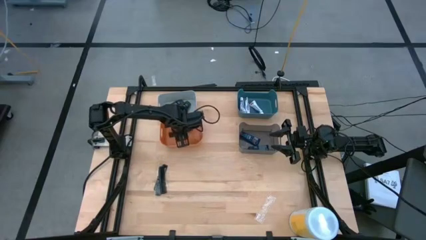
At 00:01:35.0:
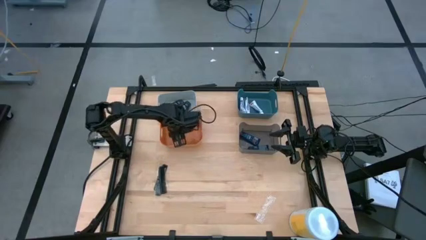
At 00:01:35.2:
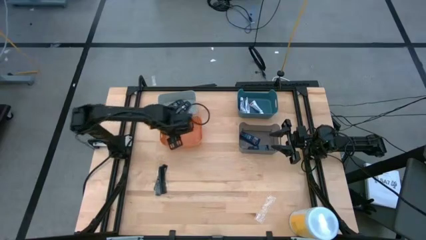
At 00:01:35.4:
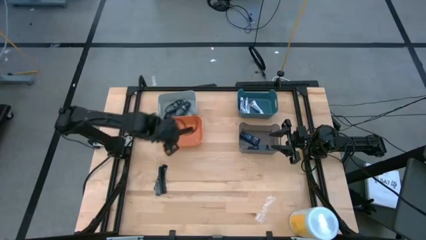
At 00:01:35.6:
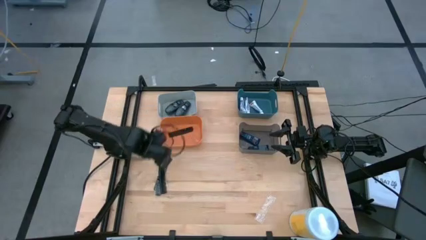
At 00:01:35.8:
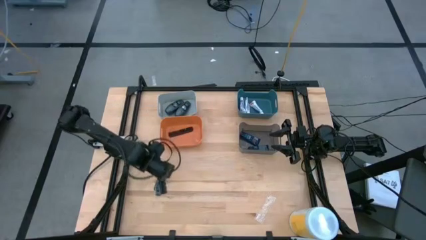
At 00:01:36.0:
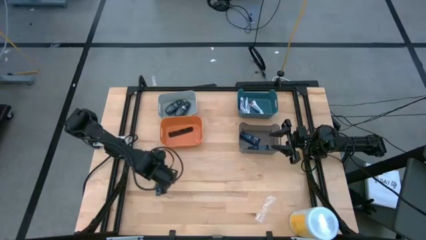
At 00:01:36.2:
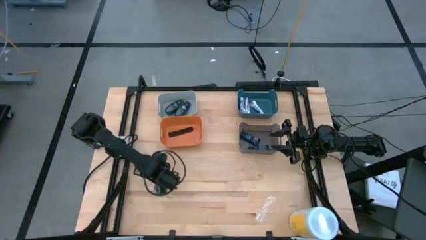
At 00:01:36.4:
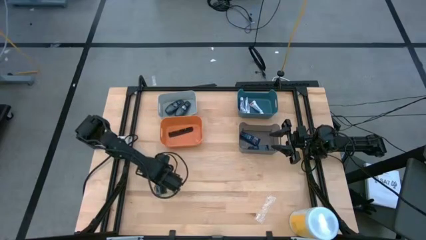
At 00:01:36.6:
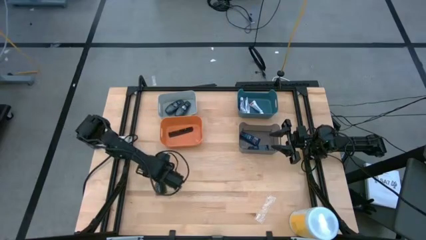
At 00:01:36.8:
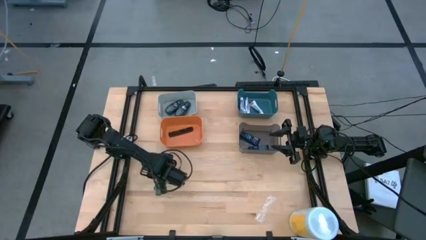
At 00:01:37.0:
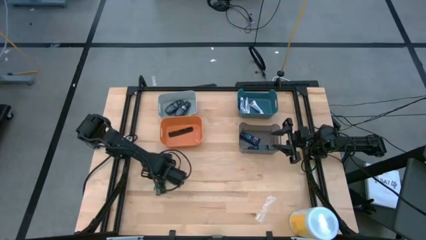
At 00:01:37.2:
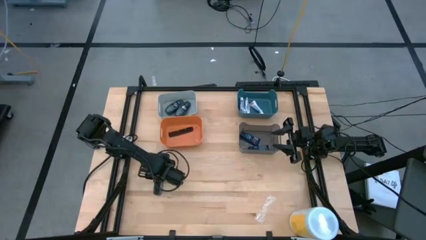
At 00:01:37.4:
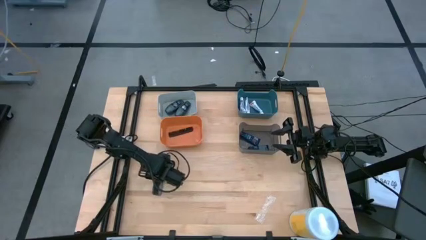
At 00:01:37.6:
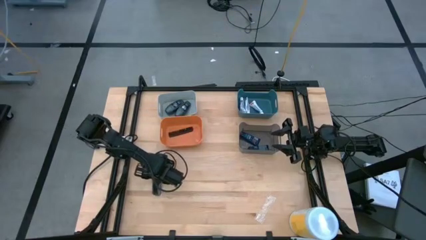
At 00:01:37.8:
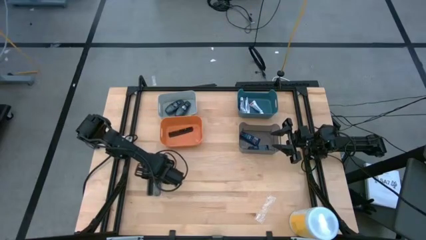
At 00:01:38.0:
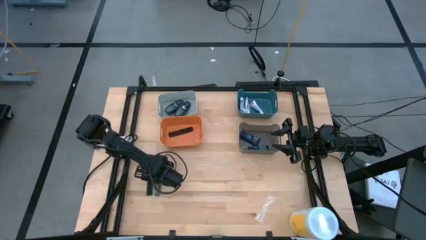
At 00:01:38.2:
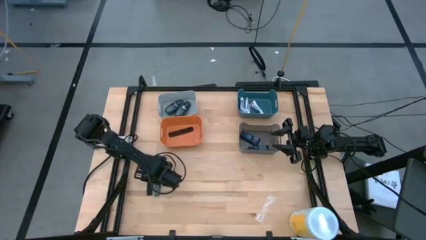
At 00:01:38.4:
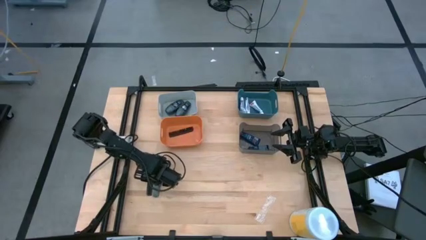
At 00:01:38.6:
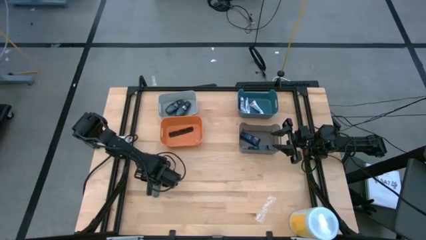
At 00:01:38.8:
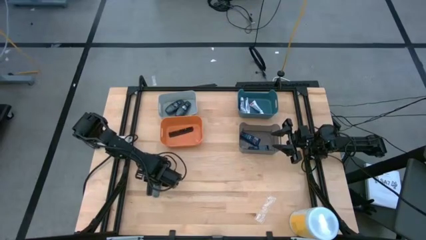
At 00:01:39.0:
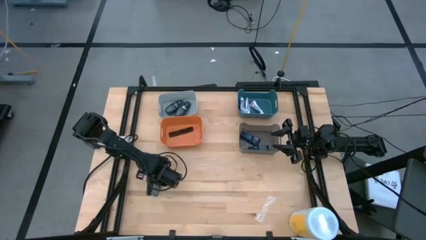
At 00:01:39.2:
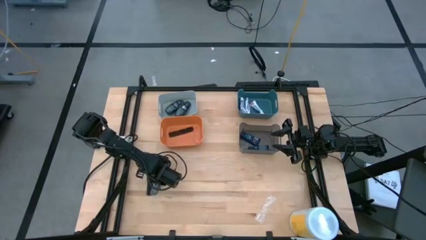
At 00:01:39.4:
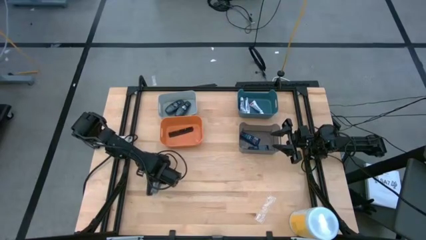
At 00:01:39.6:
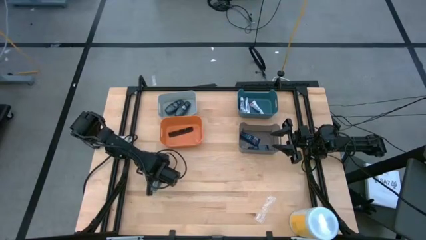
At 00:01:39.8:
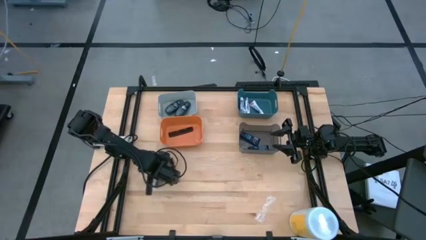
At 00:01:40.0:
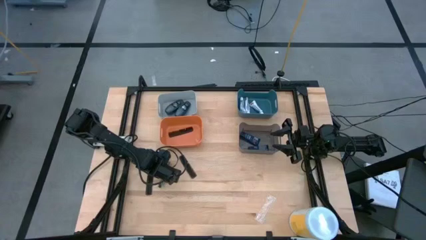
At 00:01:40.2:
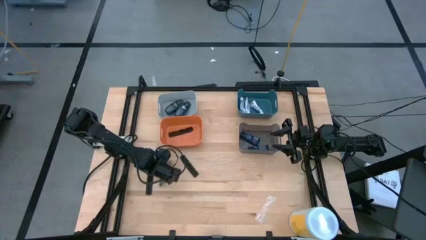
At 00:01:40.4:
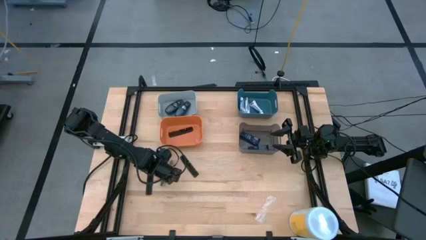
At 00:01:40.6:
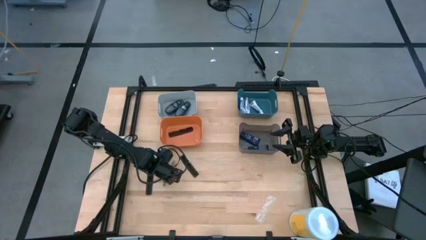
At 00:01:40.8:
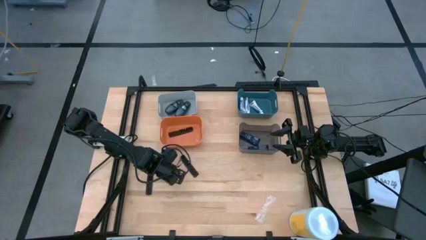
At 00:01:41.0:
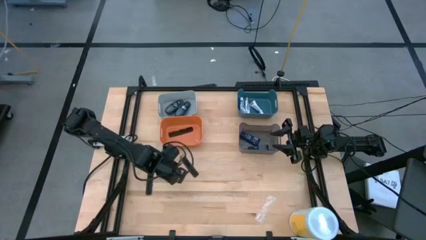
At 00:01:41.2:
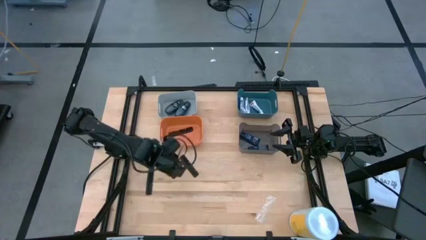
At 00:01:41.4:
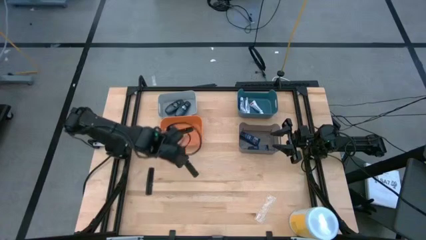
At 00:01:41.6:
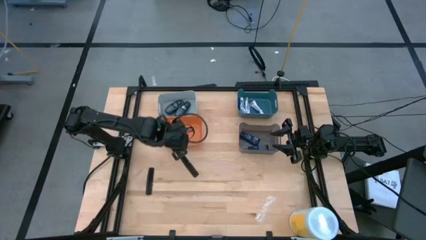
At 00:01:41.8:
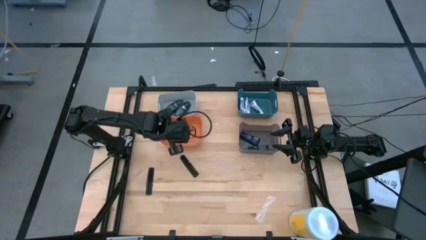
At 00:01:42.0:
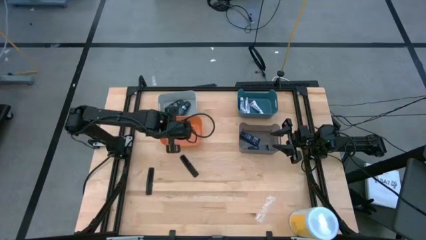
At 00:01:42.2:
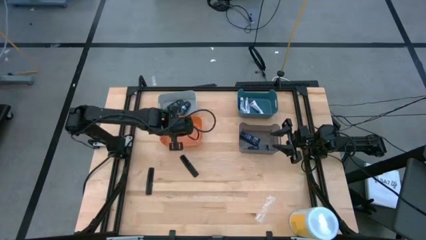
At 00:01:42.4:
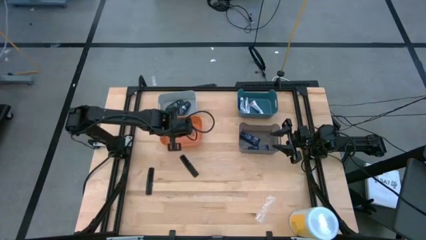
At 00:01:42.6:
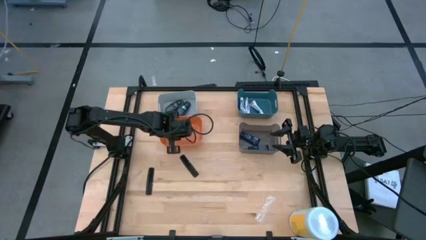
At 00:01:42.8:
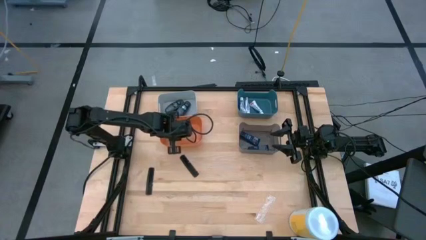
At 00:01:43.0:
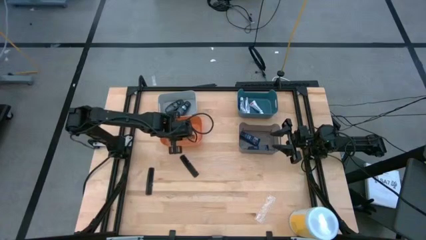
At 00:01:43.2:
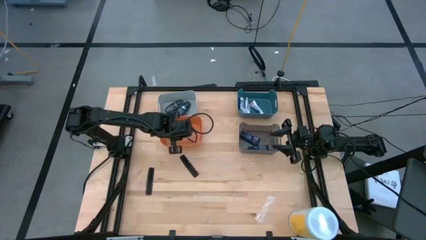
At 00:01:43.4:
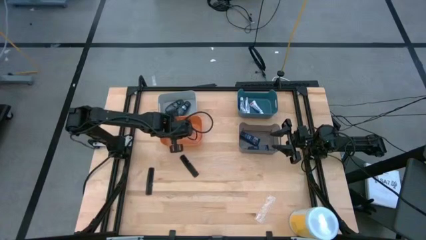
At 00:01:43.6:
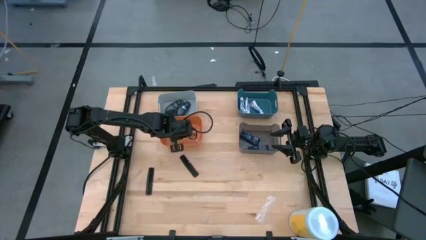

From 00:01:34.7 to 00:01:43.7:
Task: Pick & Place Travel size toiletries
Put the black comb into the orange bin

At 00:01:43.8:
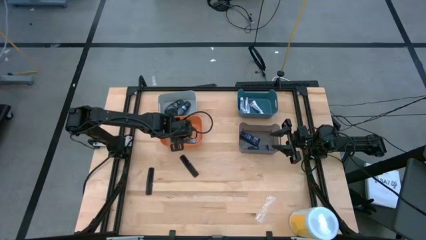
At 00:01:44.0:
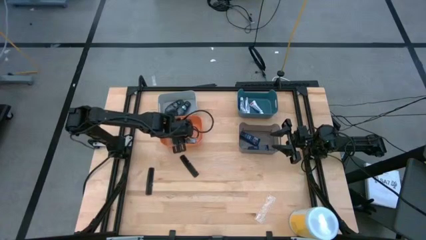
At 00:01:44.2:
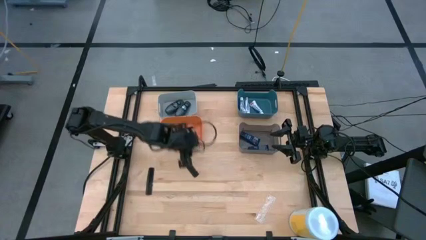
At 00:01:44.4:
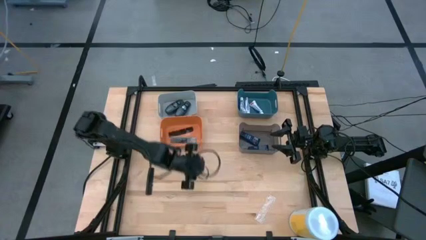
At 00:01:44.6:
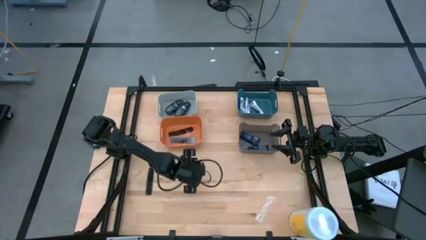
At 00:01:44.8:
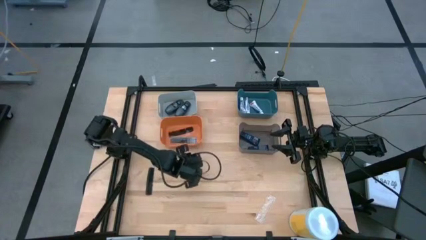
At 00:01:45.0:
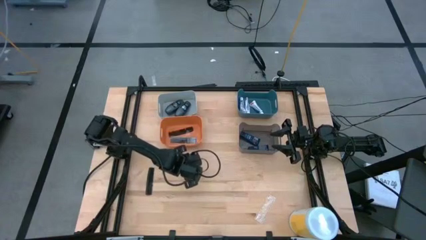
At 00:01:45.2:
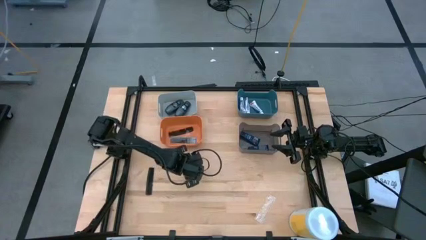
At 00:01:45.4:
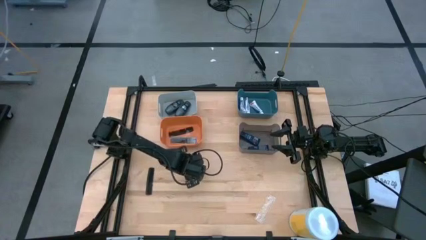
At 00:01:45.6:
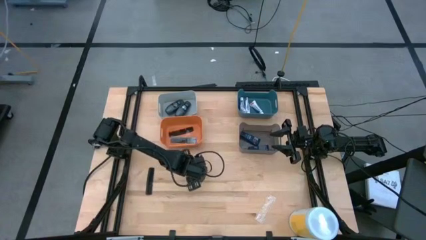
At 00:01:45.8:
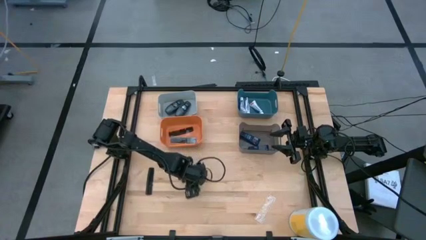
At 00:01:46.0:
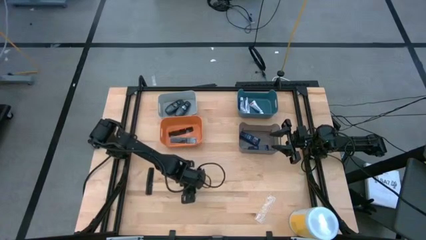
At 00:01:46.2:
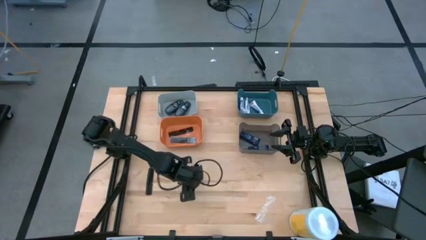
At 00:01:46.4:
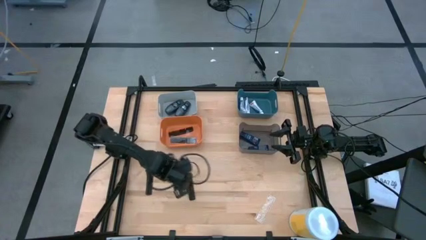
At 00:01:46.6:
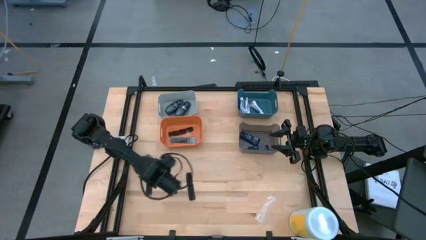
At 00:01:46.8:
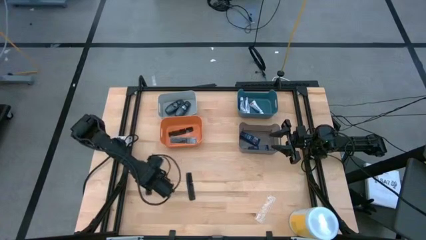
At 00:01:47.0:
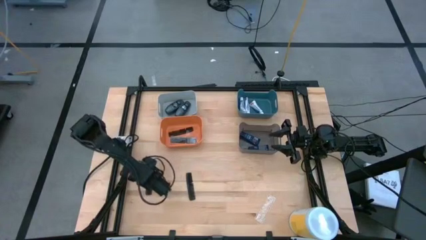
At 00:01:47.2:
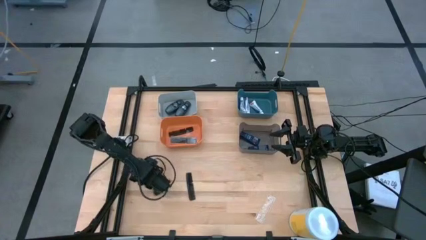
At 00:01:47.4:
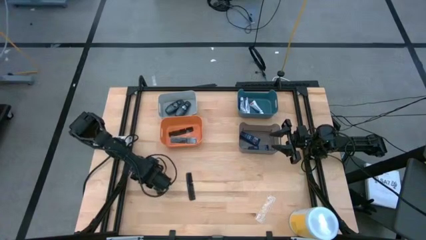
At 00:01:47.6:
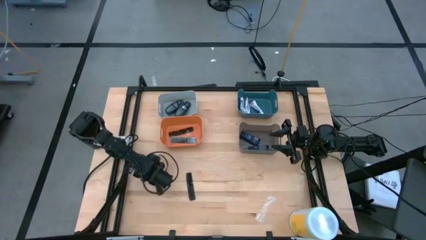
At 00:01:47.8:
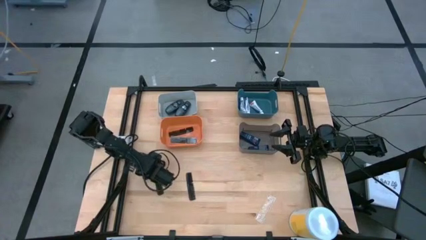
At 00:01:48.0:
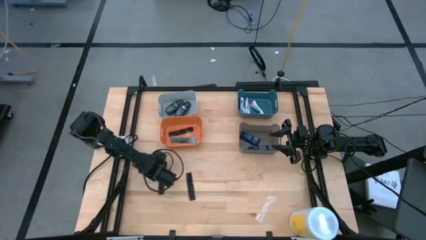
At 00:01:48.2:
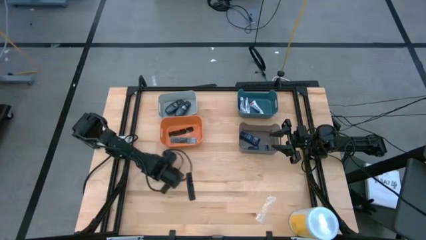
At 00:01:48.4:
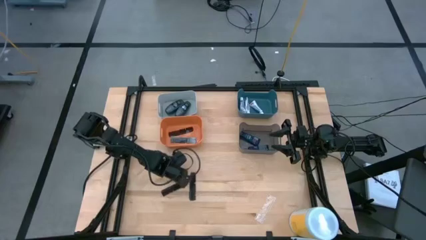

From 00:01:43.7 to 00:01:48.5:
Adjust the combs on the table

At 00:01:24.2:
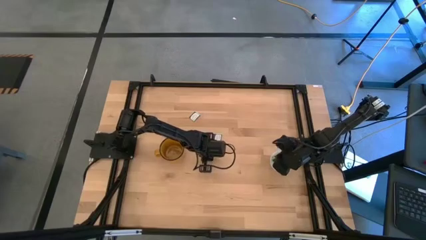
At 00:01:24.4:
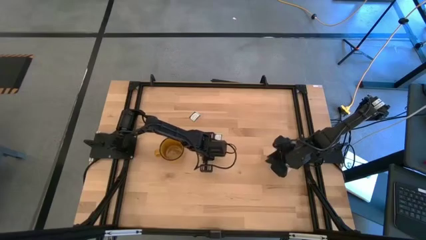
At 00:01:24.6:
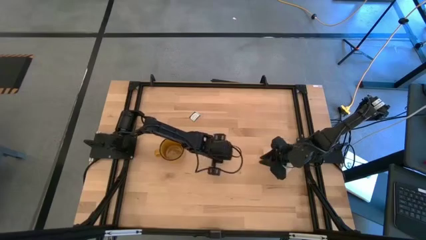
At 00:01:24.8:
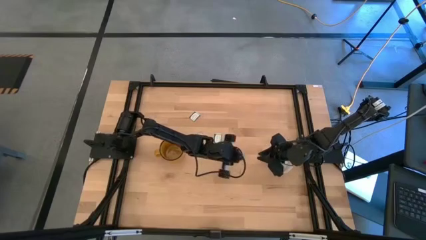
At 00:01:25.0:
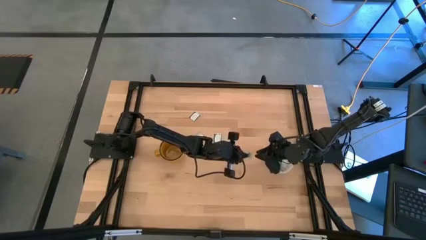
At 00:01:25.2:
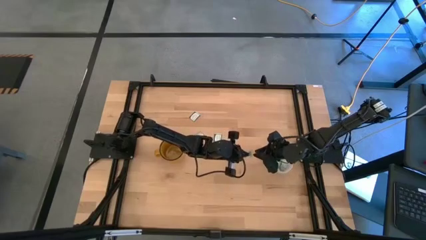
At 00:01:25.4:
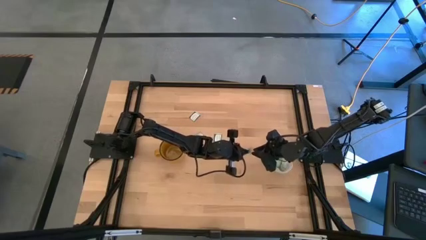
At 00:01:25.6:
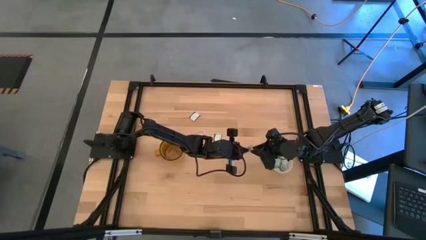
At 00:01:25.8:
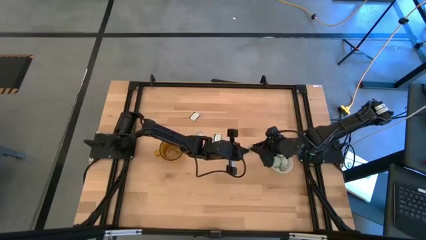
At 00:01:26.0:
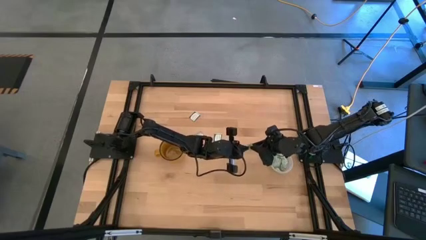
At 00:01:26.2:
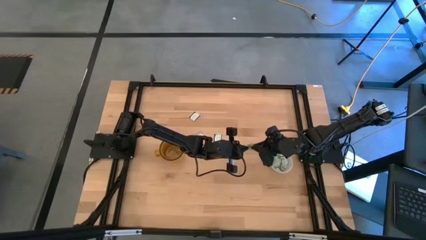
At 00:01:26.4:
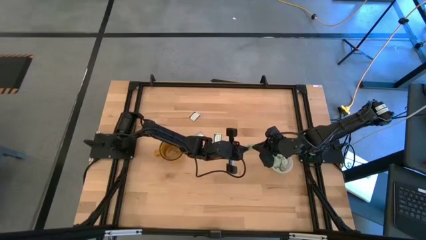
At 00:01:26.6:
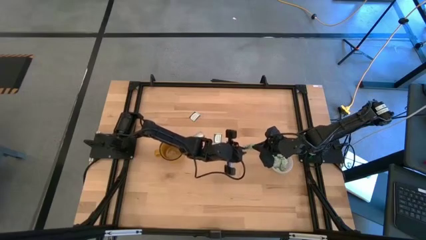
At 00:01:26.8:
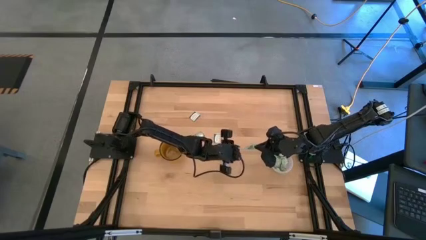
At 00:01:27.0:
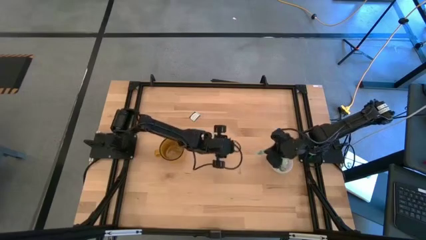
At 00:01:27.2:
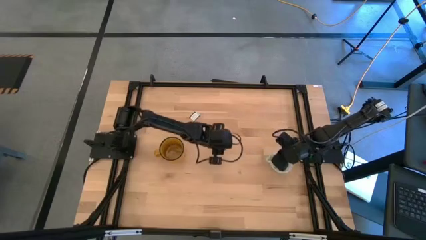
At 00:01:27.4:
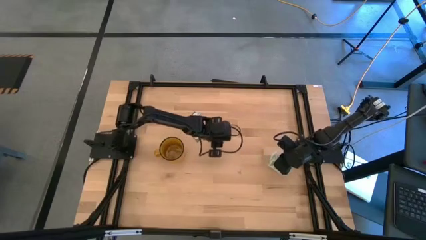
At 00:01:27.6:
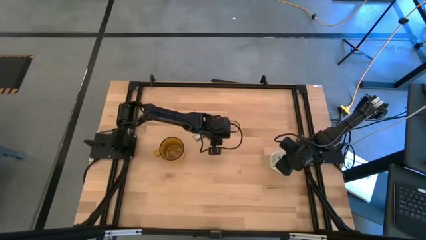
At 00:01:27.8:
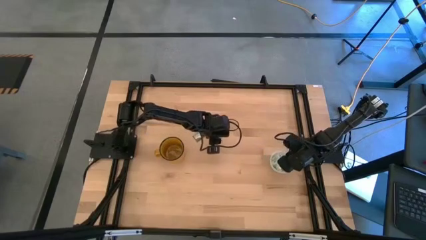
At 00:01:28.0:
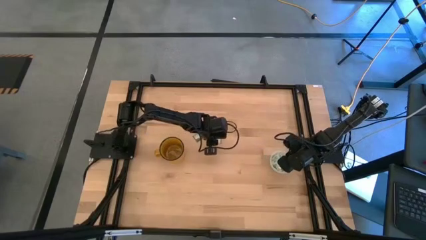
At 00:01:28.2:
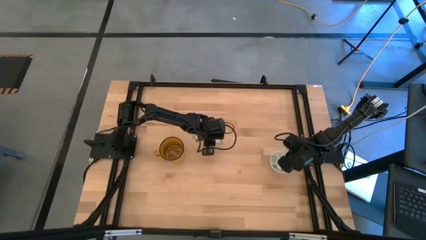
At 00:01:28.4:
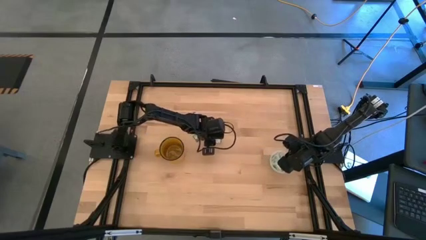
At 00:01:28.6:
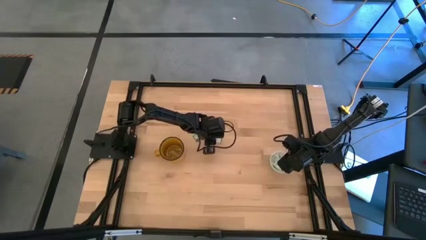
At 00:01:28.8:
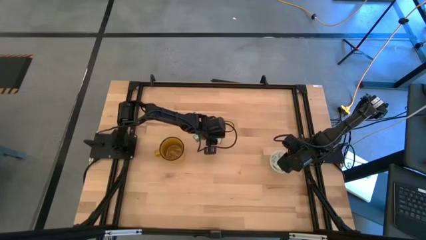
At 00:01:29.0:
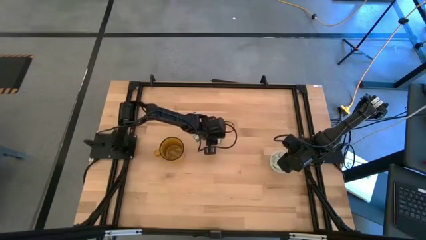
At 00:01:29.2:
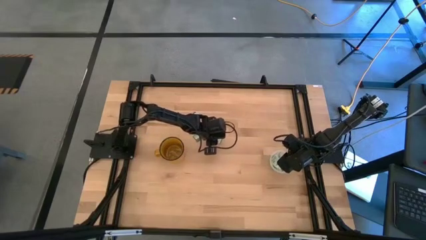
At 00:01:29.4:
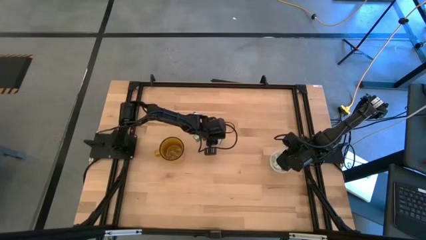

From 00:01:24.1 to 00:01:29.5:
Task: Pick and place Stevia / Truvia into bins
Put the green stevia packet into the transparent container
